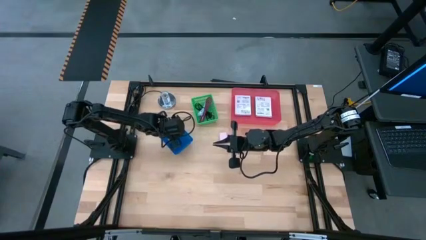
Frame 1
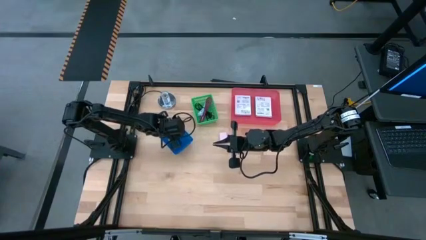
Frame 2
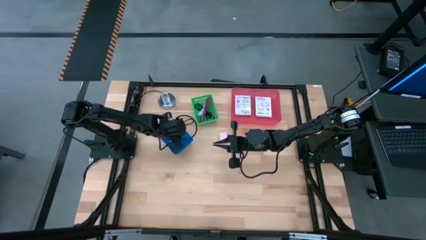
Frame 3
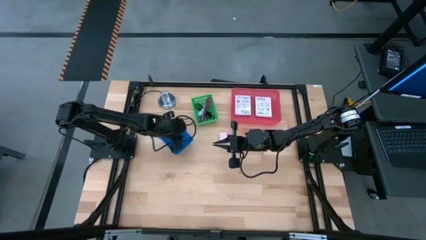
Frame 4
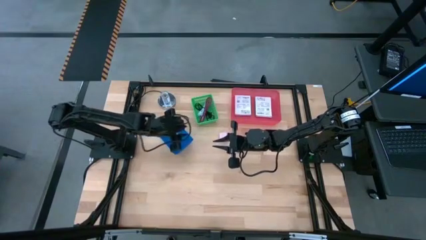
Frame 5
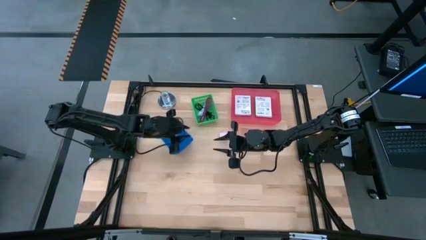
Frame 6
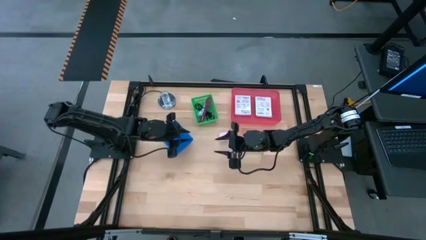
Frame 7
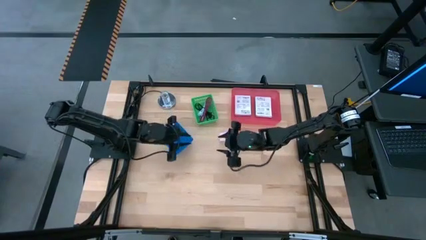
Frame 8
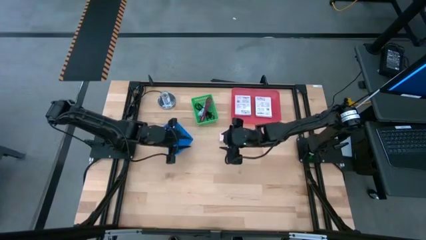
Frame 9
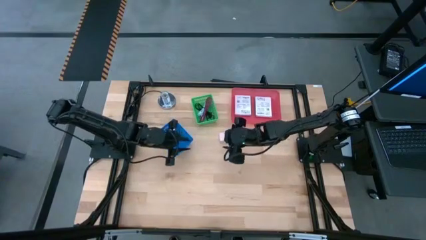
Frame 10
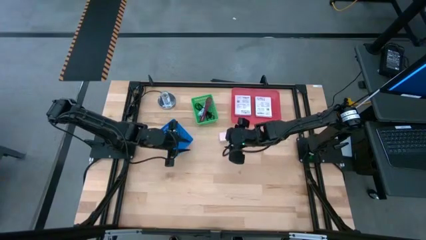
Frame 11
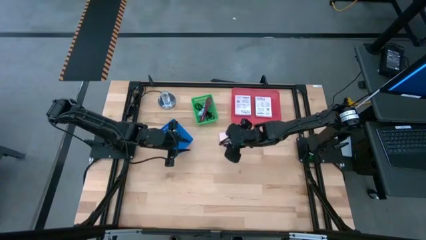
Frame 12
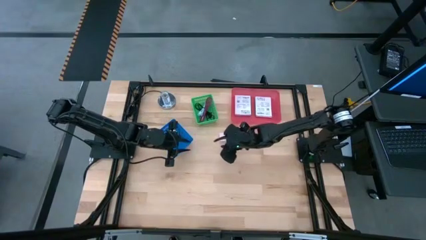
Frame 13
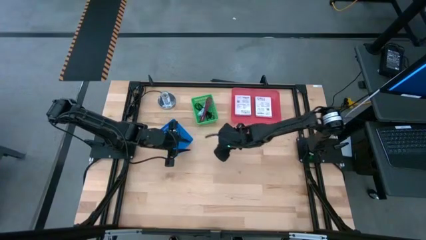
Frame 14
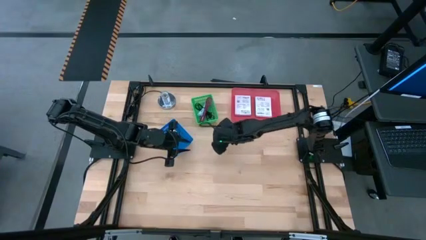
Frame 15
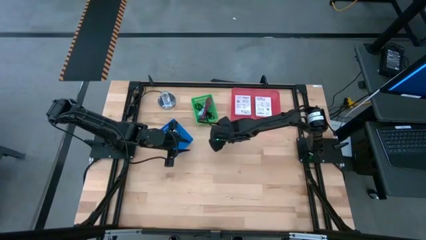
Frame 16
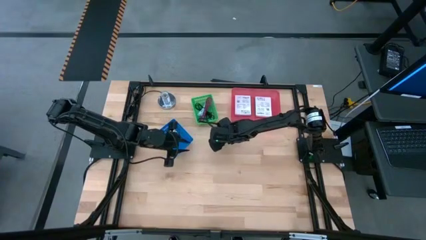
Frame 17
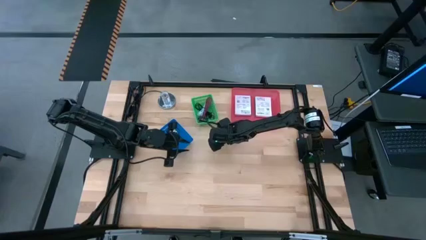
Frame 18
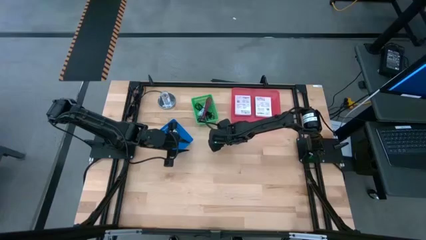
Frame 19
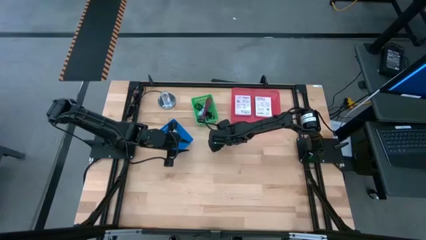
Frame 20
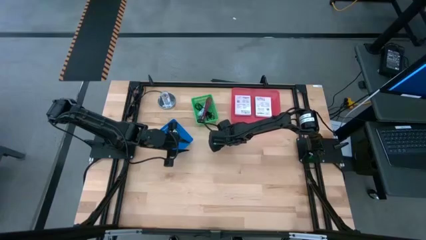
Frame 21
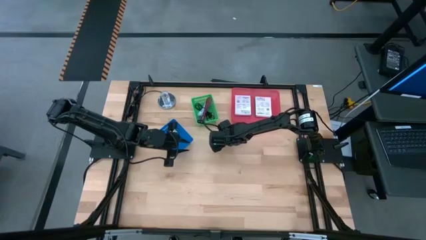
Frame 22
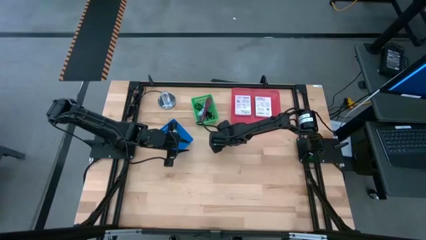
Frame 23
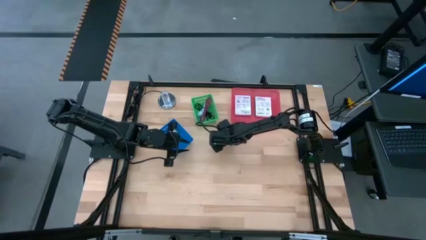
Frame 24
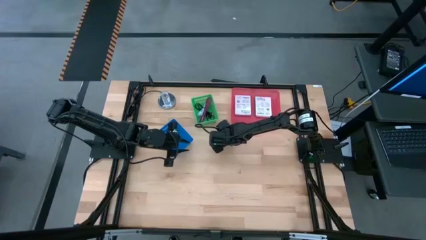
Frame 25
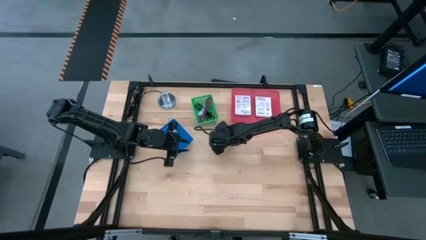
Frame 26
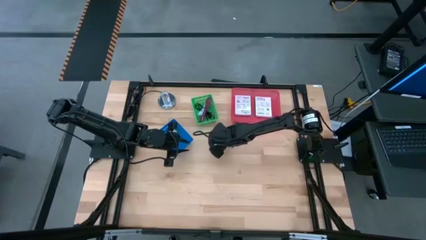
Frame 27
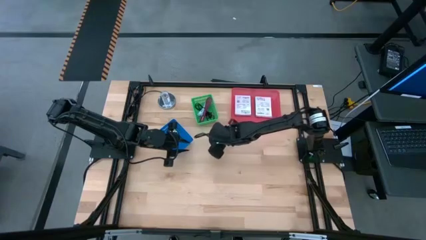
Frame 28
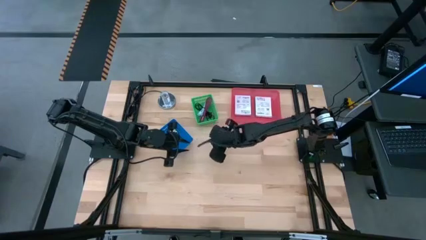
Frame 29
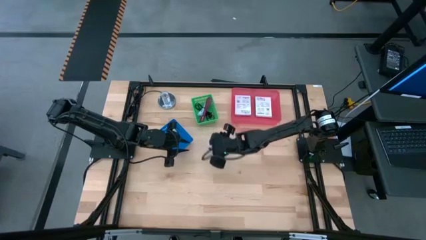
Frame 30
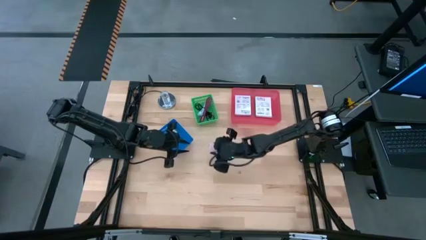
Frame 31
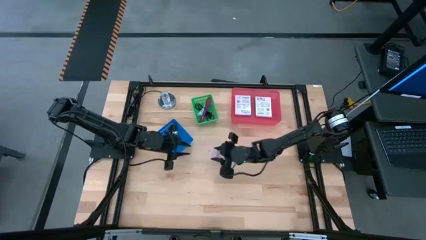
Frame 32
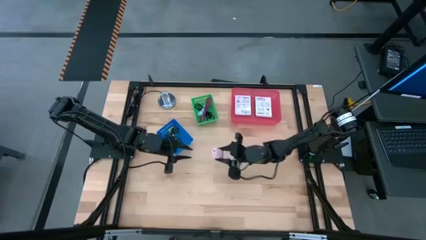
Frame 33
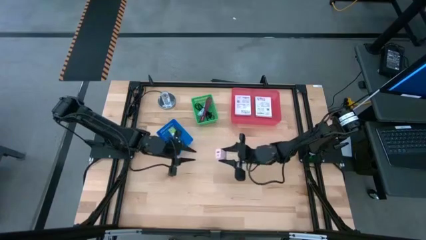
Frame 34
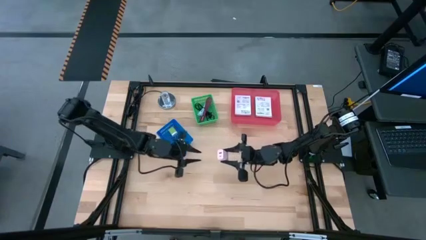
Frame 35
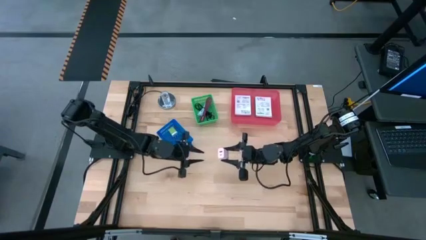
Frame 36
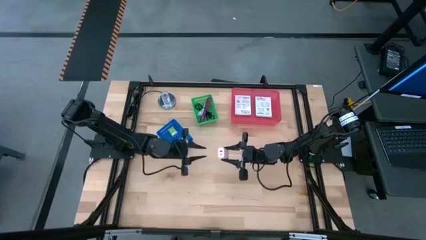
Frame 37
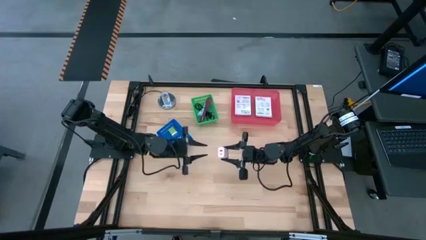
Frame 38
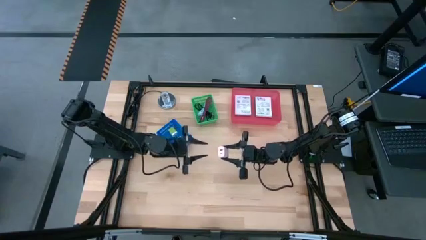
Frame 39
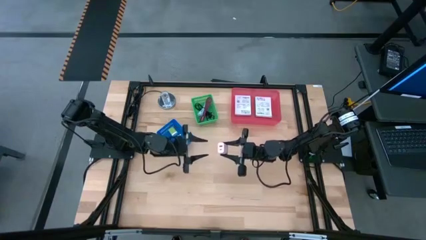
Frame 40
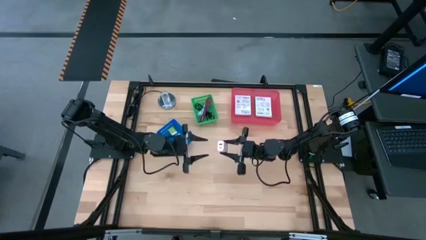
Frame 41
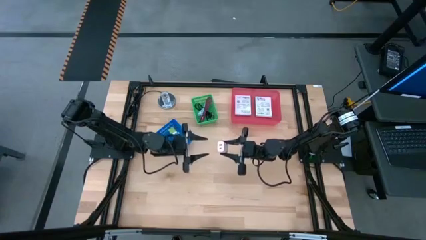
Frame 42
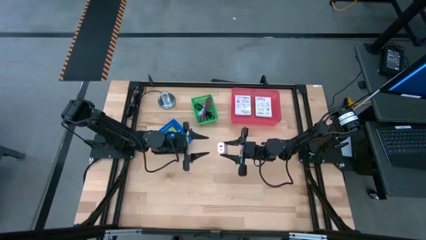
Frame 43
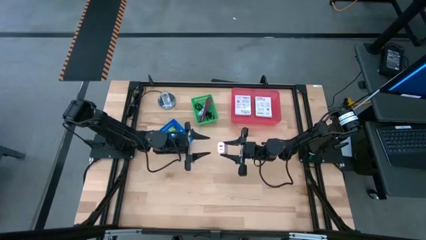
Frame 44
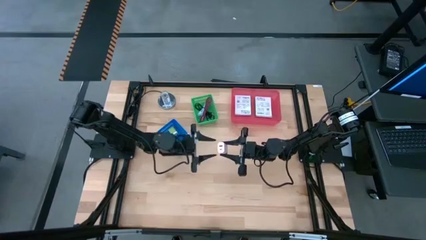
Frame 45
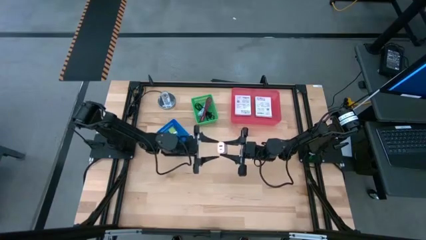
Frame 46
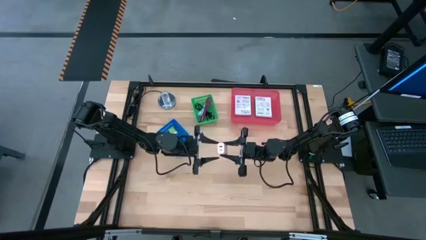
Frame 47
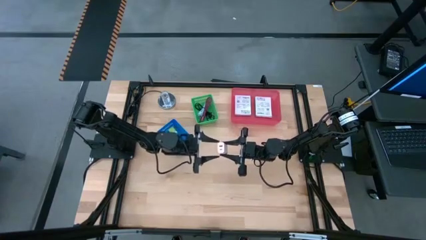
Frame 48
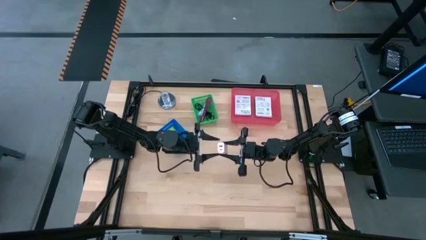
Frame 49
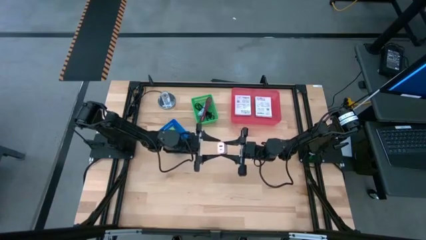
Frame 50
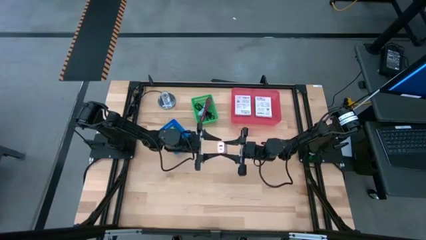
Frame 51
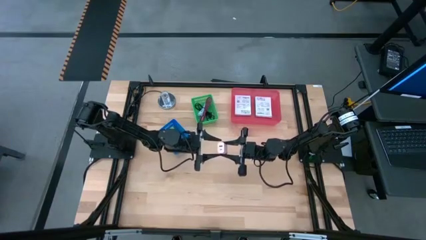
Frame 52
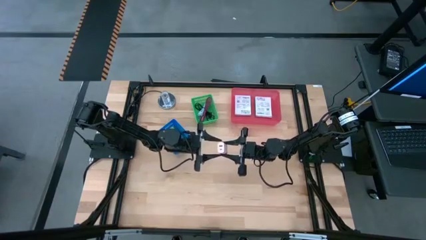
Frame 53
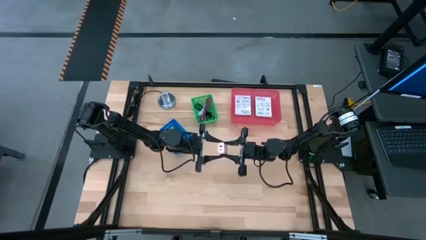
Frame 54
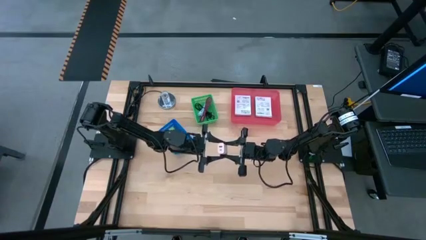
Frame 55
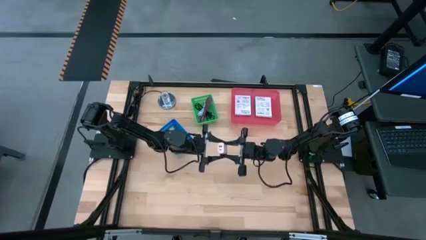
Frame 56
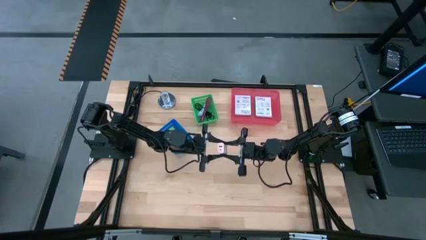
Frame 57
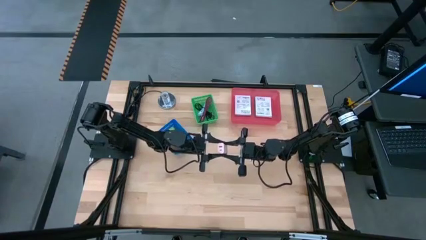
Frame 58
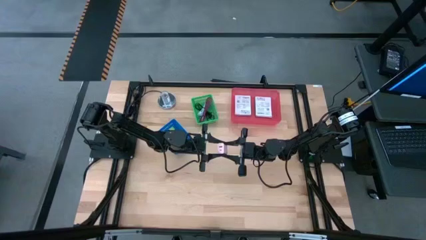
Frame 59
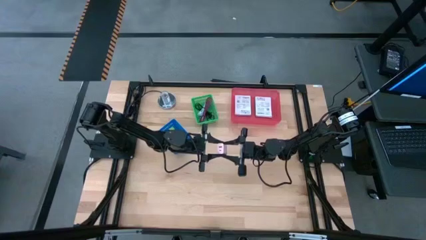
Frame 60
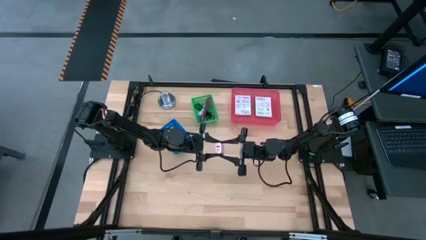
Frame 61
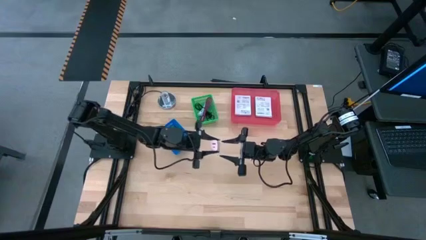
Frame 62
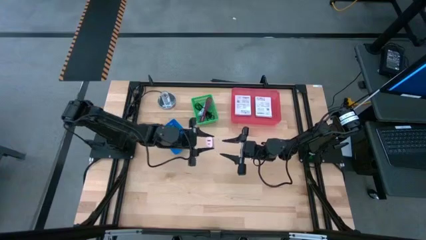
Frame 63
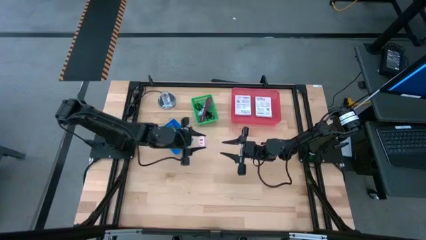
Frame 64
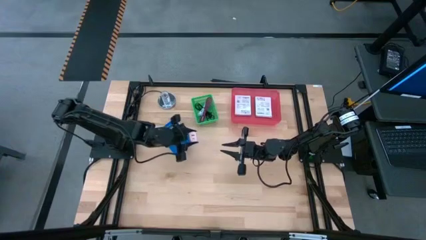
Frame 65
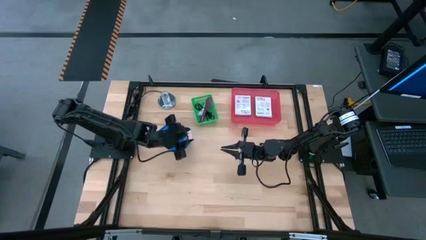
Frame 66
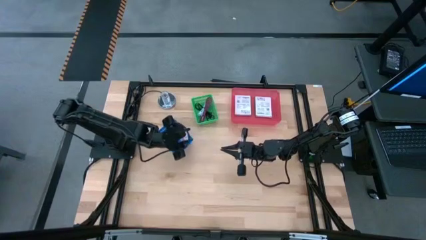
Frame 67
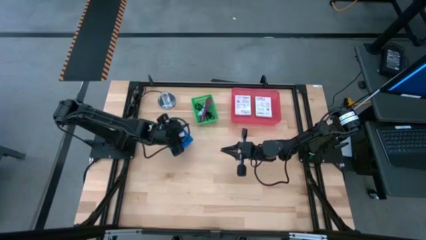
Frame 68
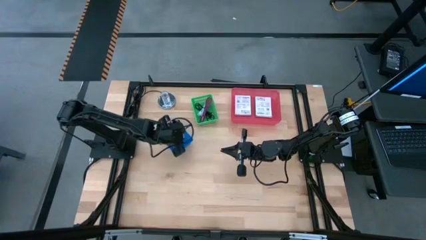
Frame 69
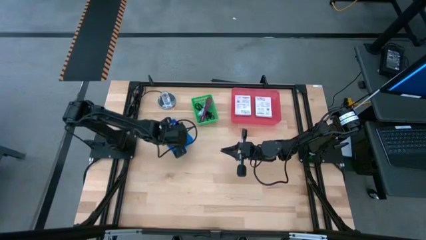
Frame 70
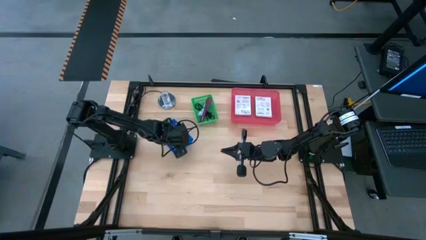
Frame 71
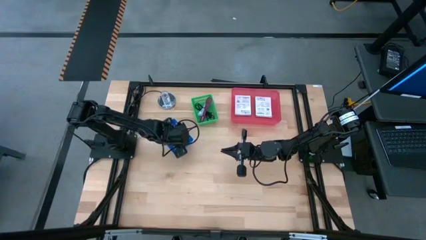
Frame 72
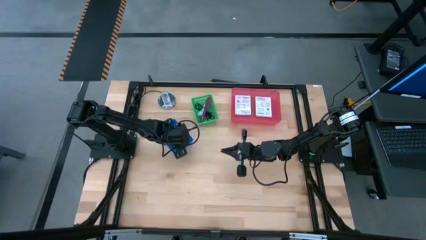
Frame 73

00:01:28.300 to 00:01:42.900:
Task: Pick and place items into bin
Put the pink charger adapter into the blue bin

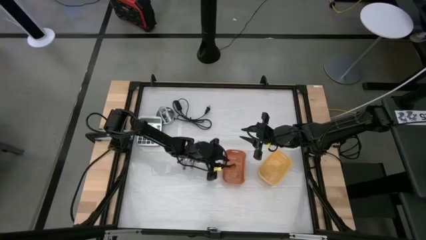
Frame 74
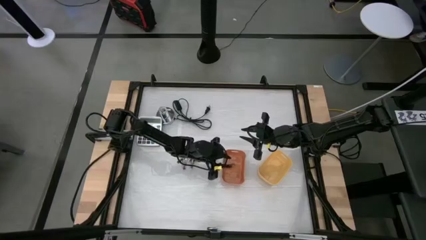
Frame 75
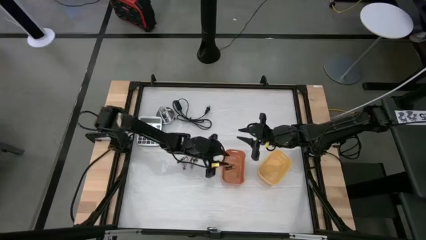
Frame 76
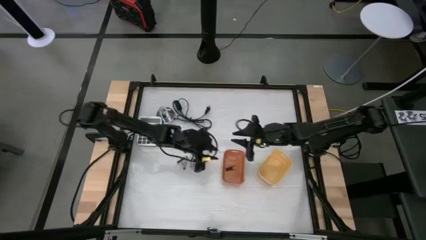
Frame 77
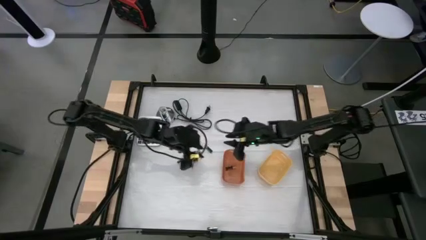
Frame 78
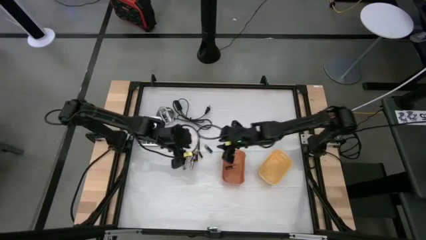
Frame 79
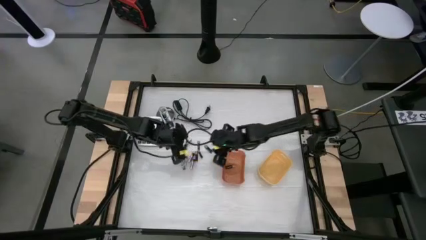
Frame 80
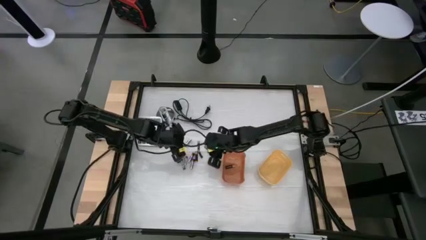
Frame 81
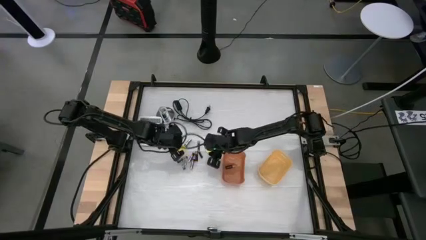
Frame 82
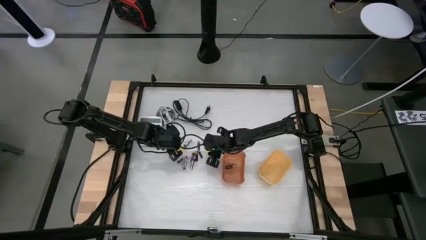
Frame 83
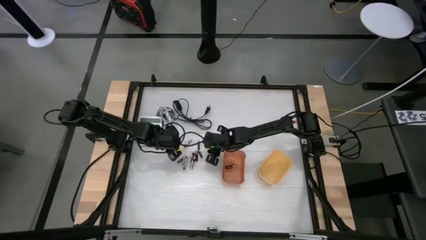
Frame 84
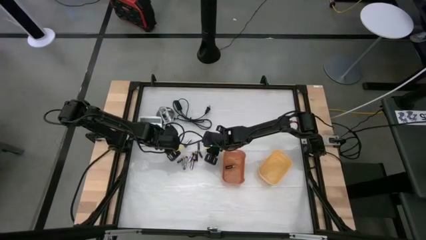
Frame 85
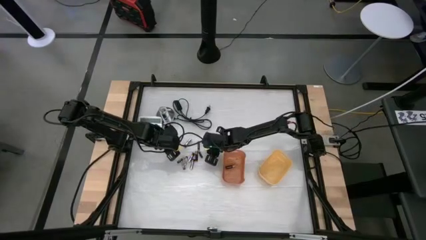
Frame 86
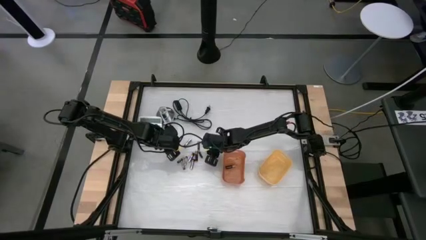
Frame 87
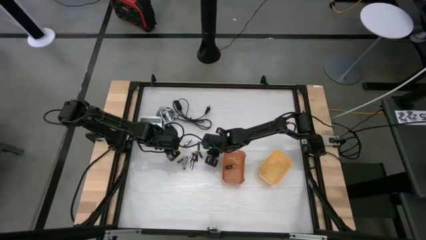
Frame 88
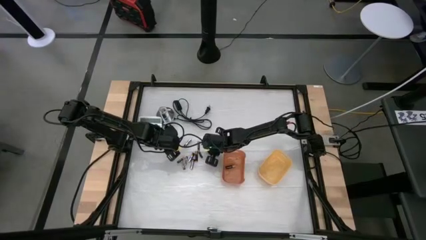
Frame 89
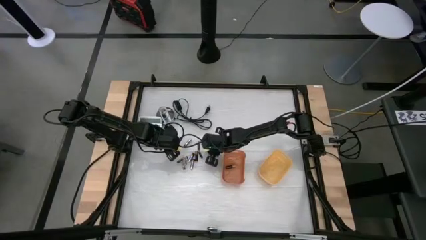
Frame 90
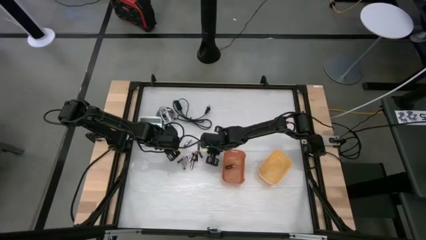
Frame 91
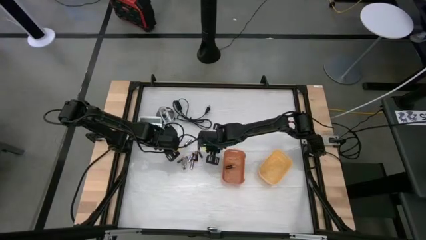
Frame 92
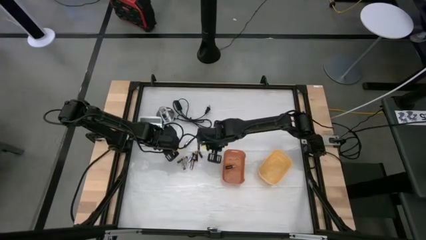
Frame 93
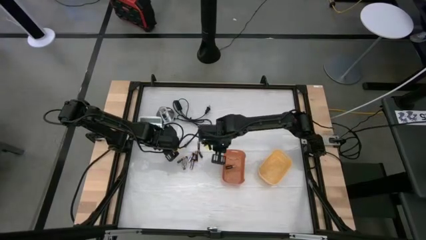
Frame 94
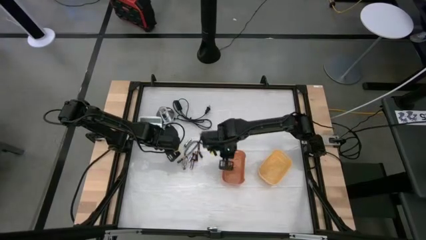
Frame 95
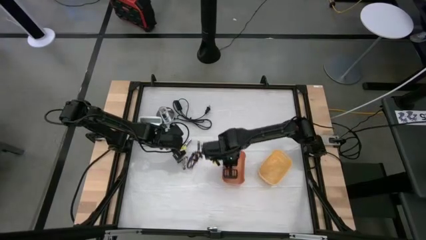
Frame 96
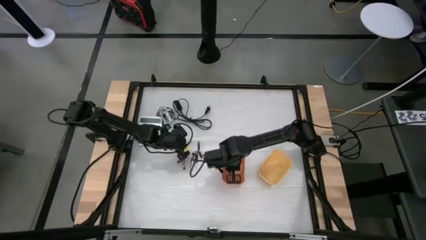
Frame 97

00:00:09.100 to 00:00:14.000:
Task: Sort batteries
Put the black battery into the orange bin
